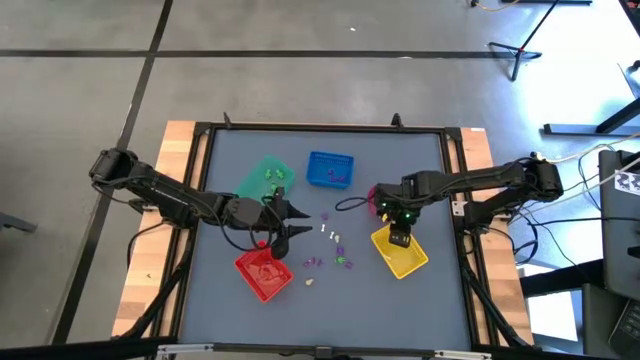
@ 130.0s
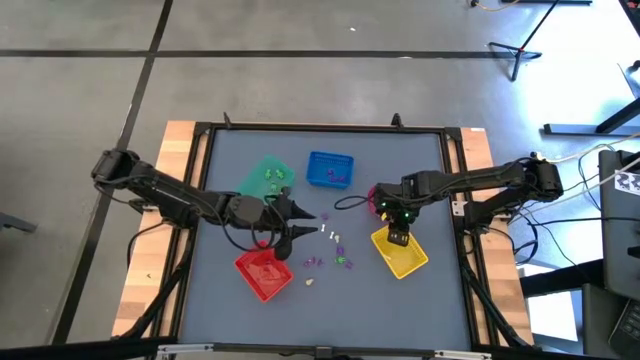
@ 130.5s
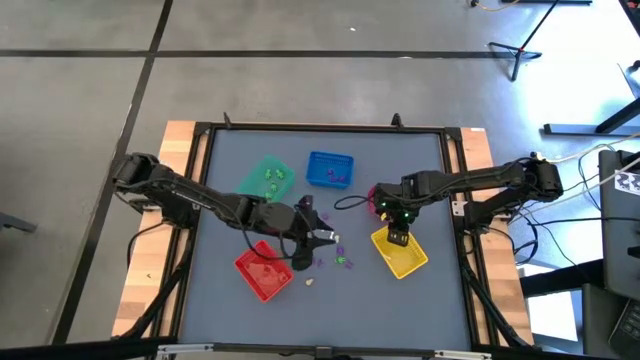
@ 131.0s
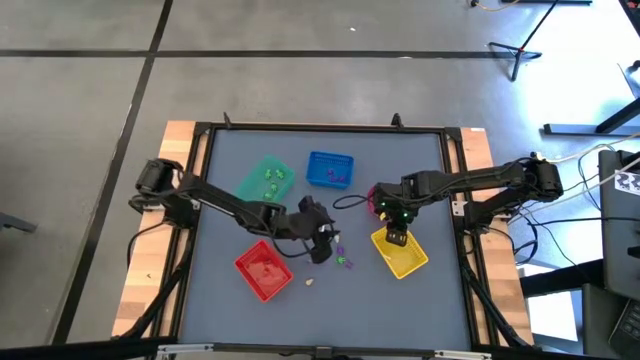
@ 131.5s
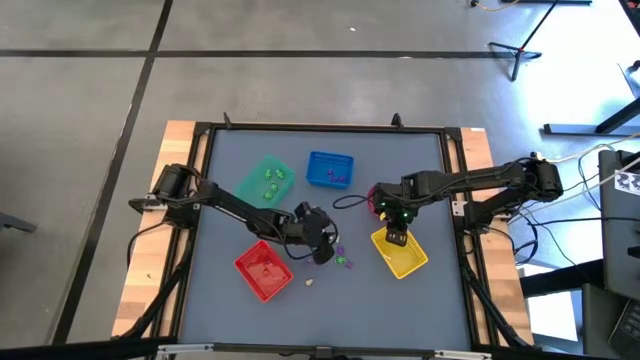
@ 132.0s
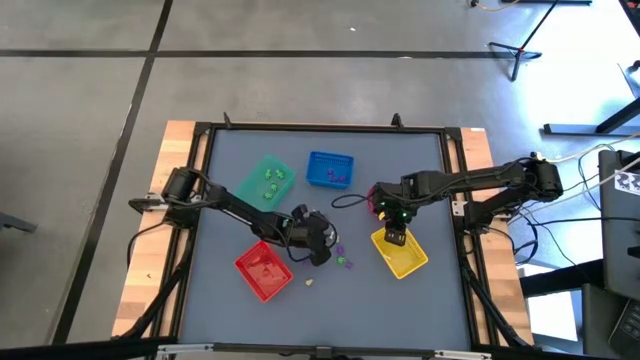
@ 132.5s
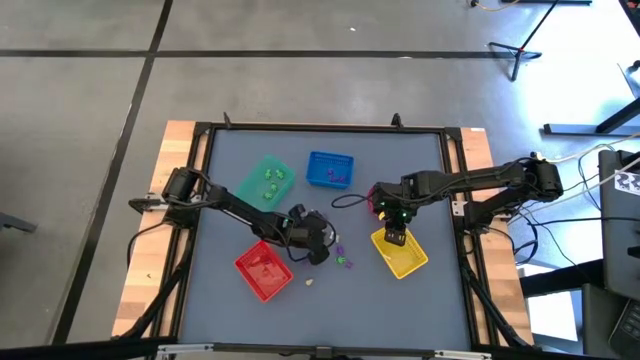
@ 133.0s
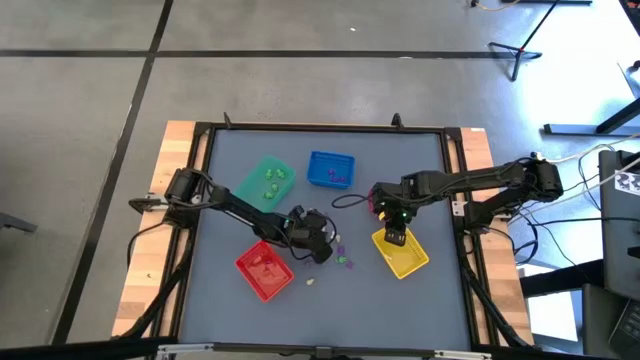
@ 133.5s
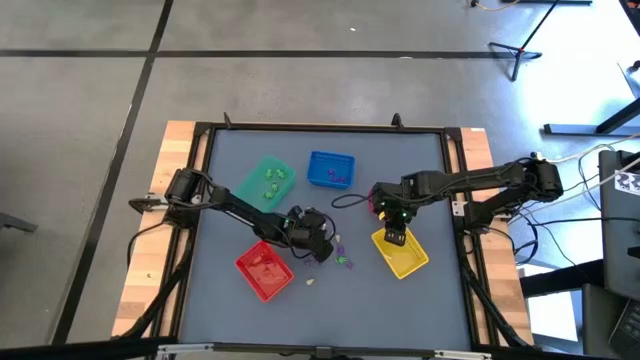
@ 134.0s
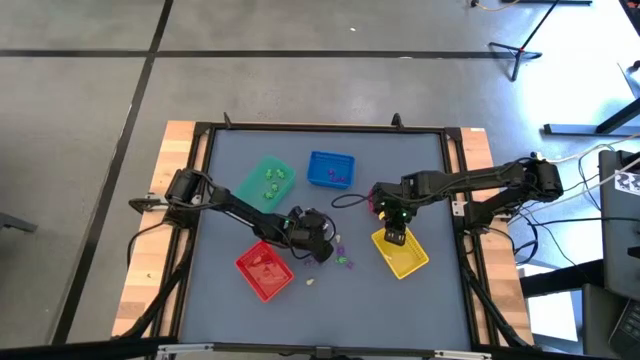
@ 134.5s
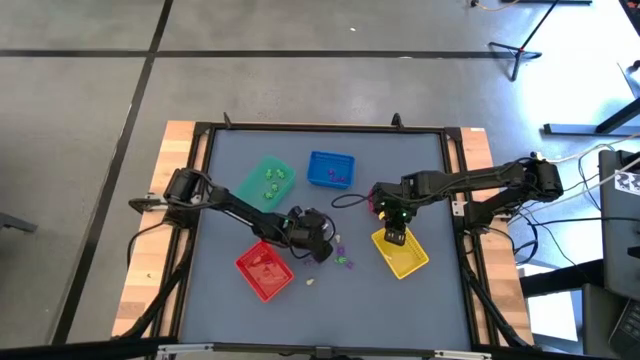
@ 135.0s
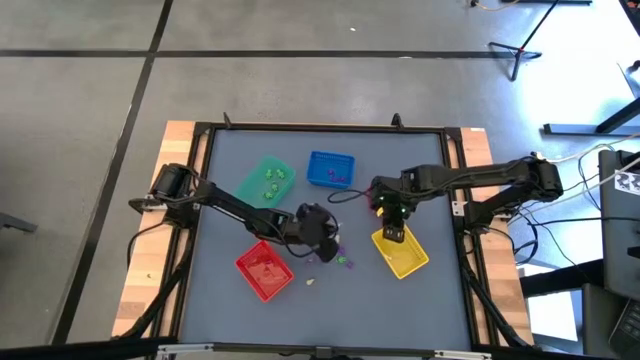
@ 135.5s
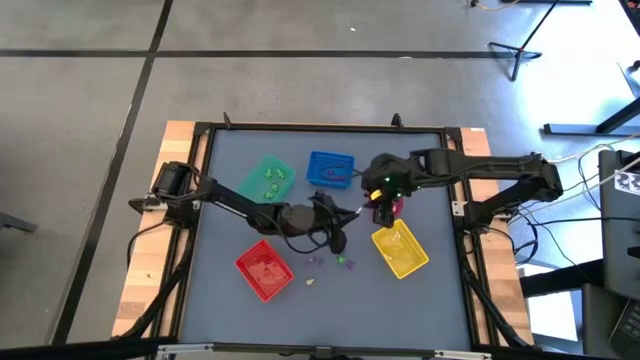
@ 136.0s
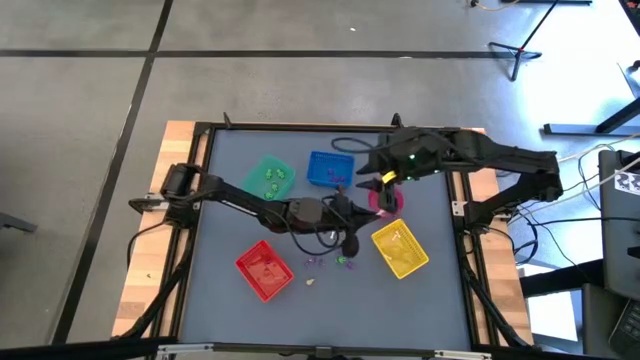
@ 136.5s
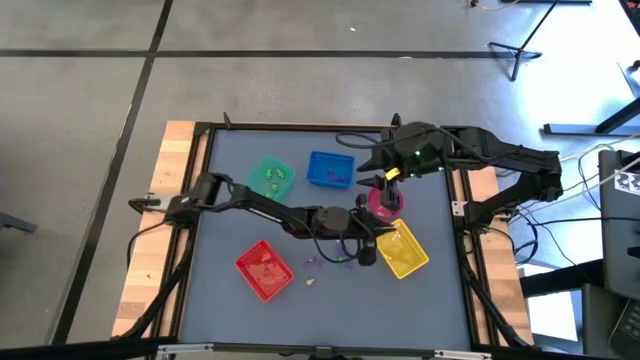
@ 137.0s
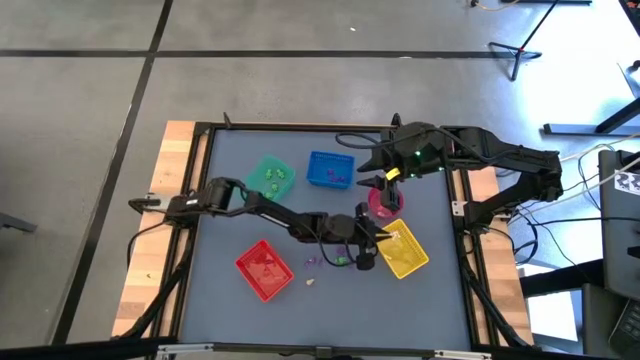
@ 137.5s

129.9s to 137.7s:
Task: Sort Halloween decoration
Put the white bone toy into the yellow bin

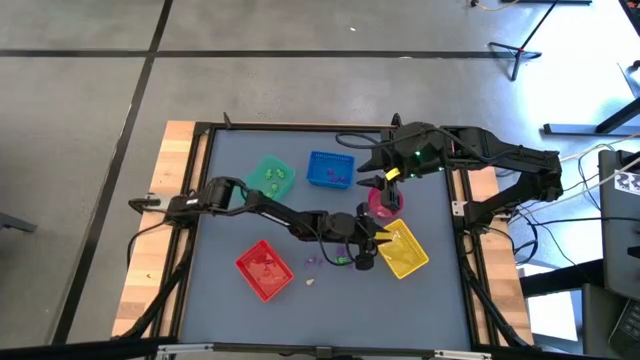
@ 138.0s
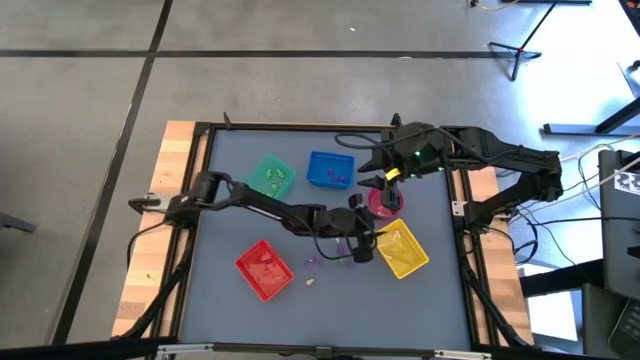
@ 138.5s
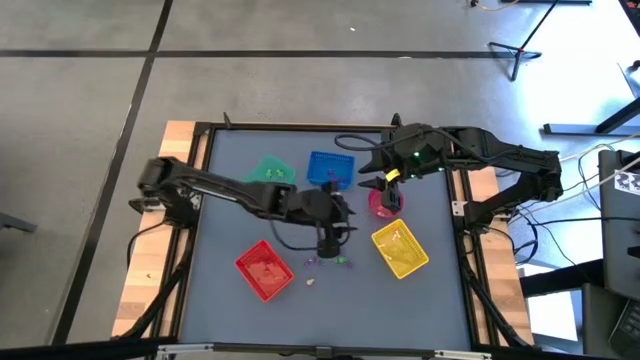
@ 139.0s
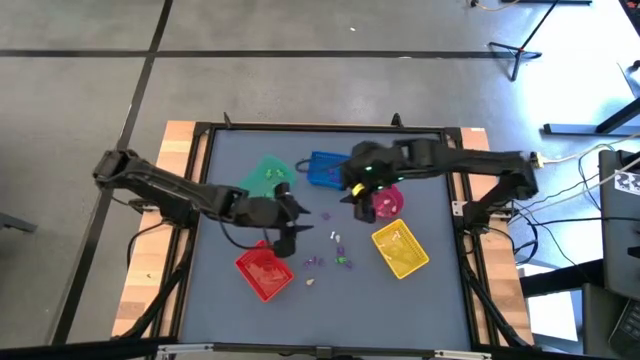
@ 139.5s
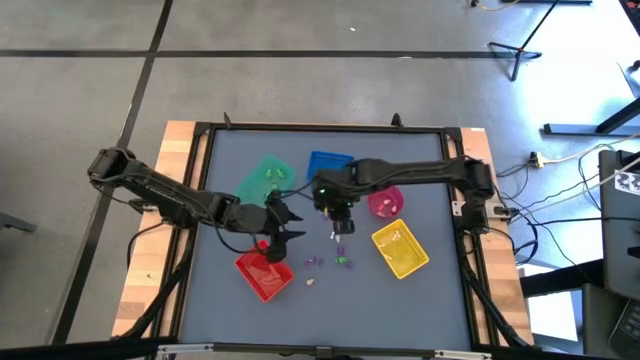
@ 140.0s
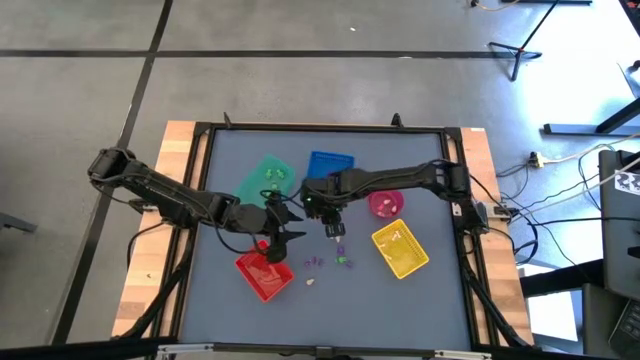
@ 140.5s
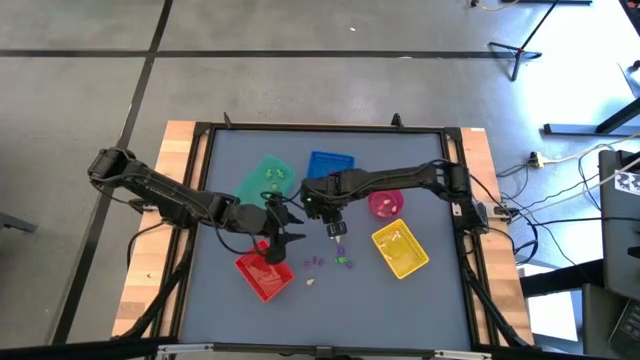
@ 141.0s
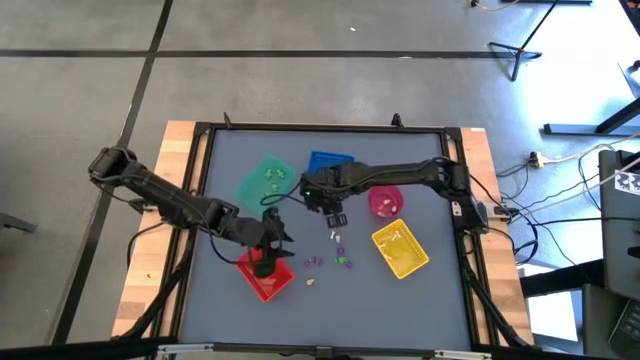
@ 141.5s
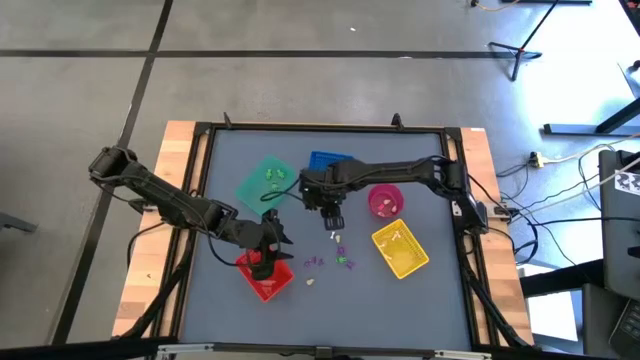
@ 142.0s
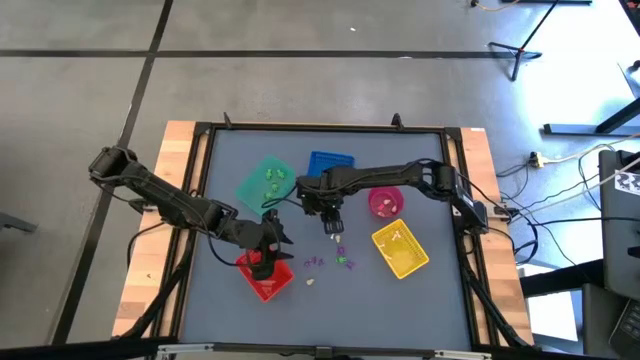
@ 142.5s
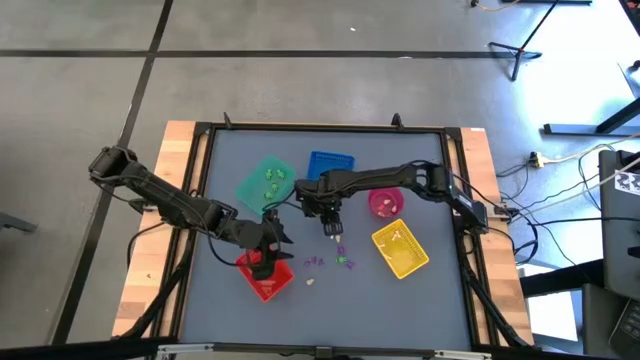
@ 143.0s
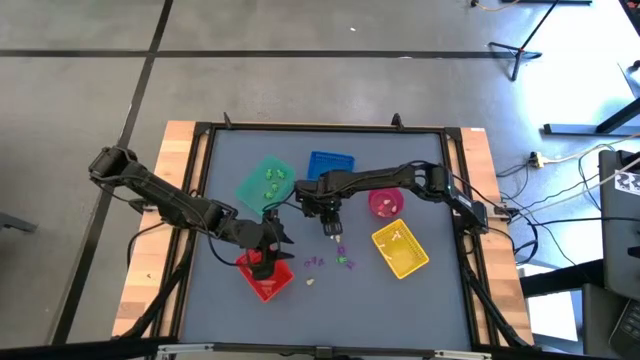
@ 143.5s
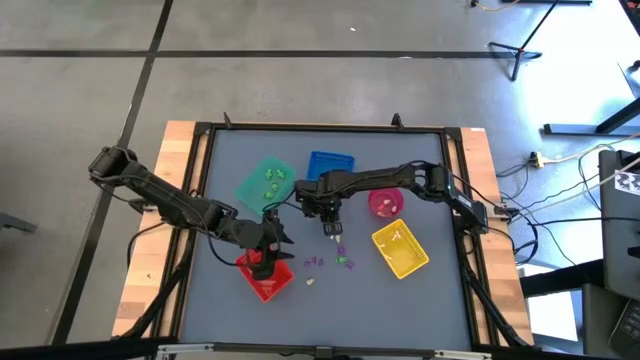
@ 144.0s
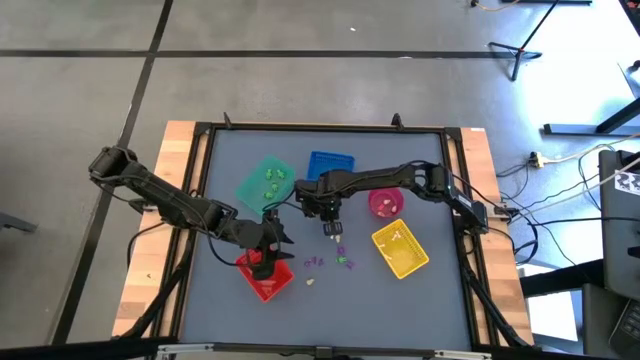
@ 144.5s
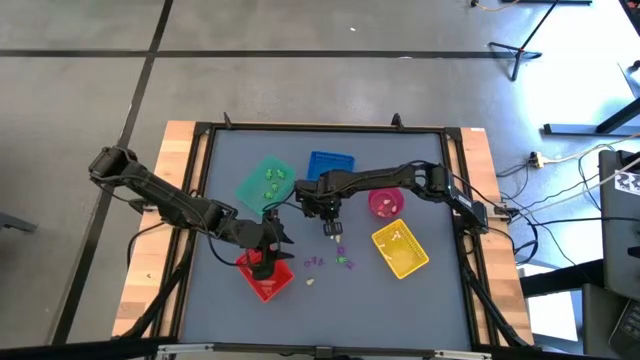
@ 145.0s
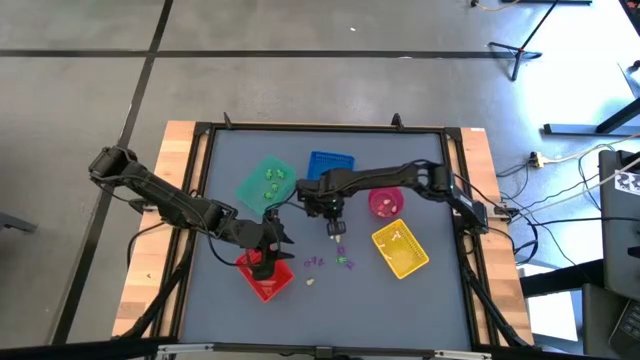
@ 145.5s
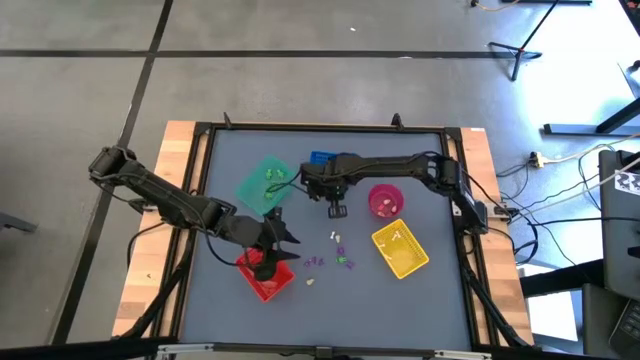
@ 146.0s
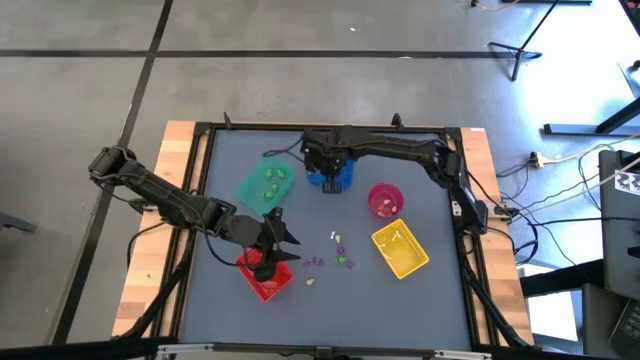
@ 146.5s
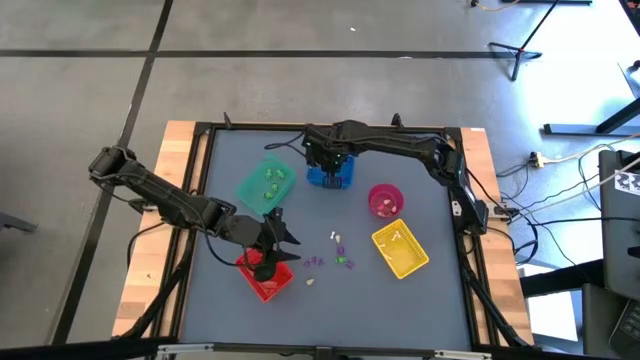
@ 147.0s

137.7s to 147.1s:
Put the purple spider toy into the blue bin

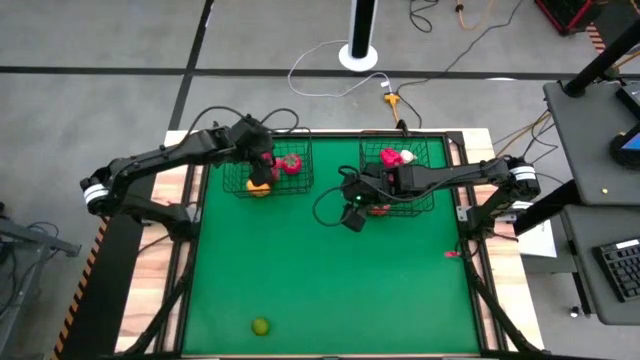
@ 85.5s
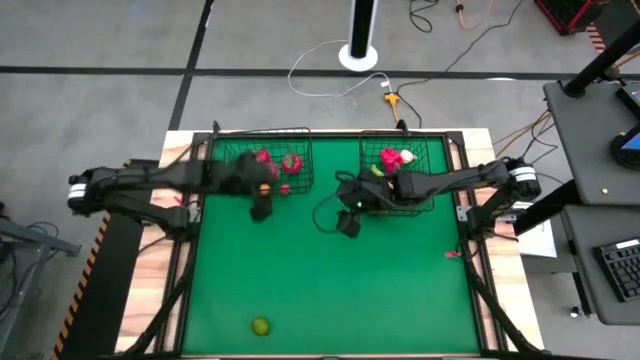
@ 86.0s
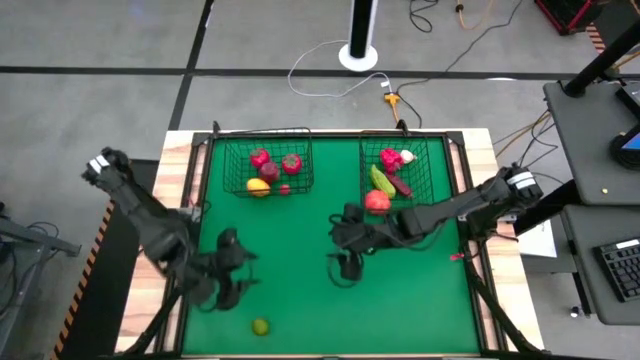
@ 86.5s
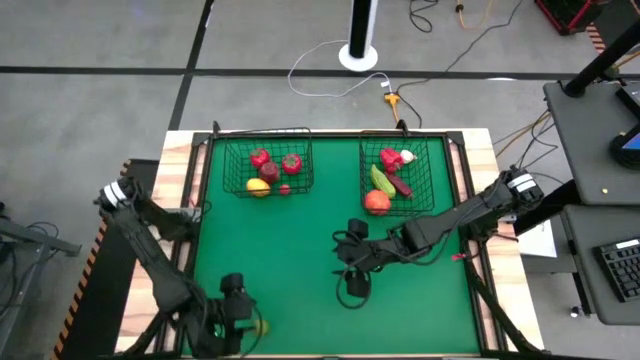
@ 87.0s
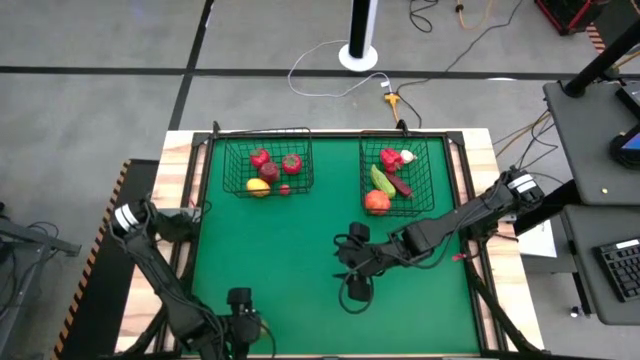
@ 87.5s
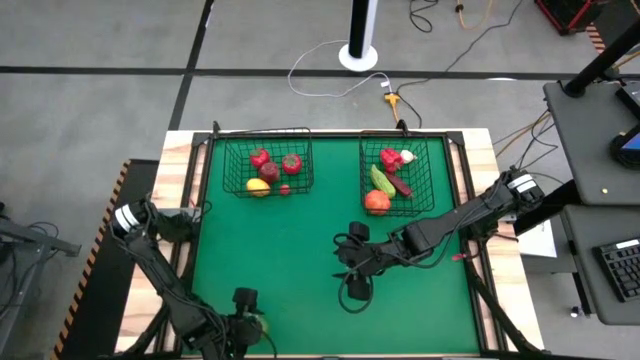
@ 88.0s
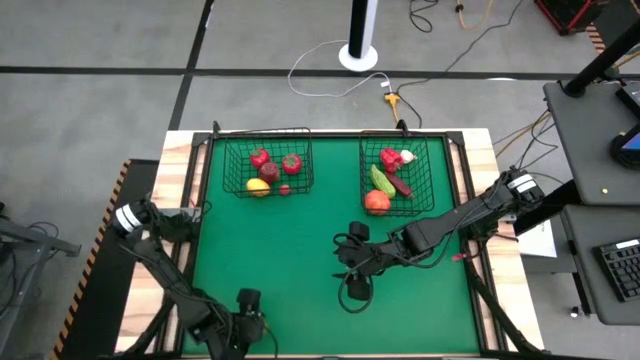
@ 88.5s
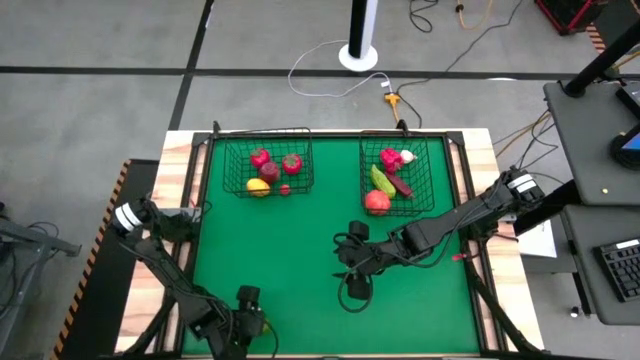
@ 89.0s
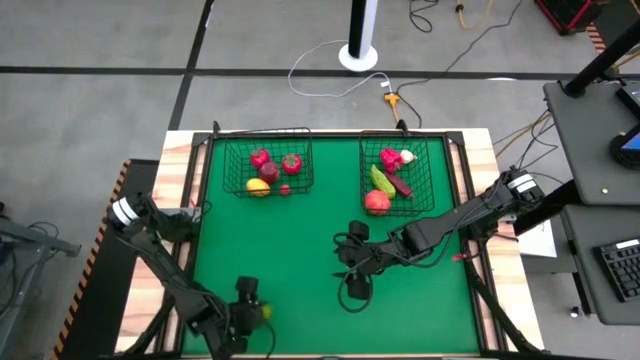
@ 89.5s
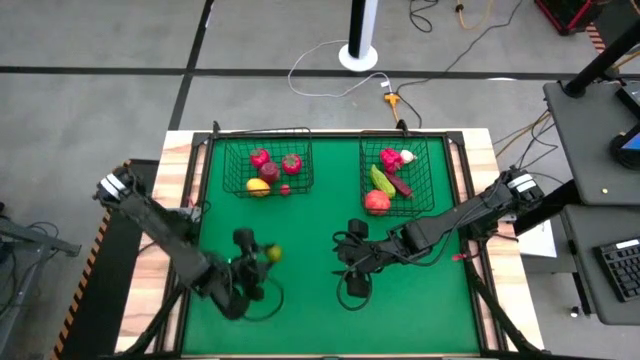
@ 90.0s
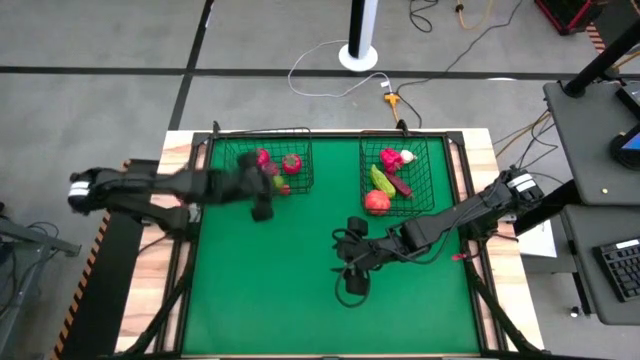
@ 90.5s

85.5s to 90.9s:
Task: Sort produce into baskets
Put the green lime into the left wire basket
